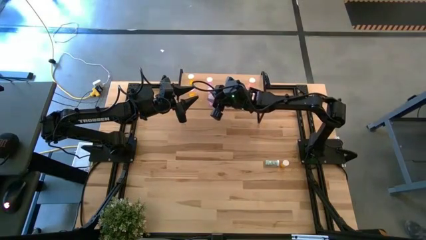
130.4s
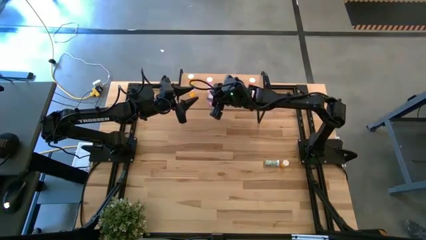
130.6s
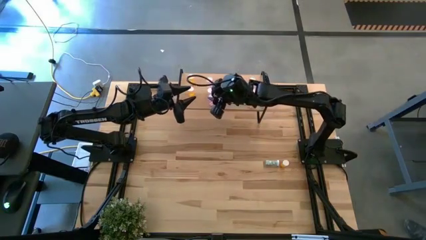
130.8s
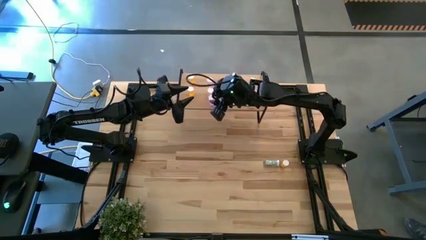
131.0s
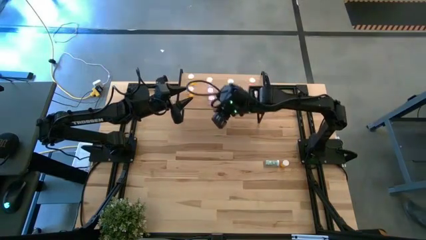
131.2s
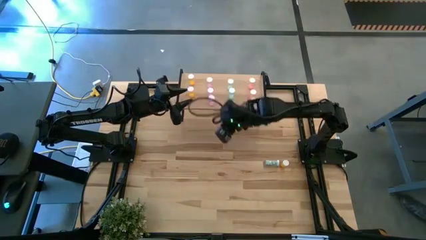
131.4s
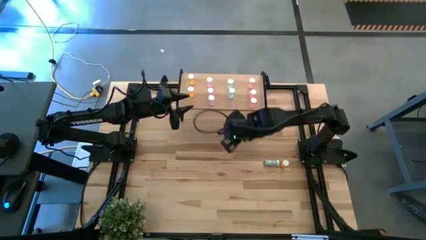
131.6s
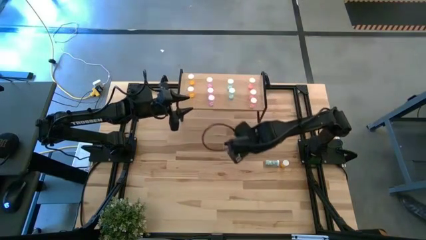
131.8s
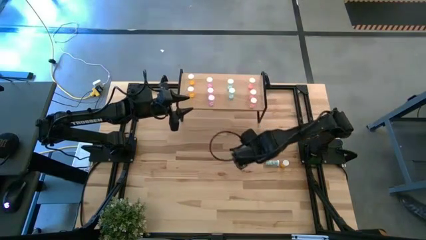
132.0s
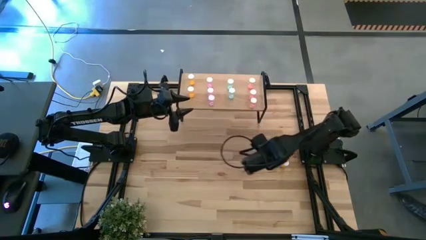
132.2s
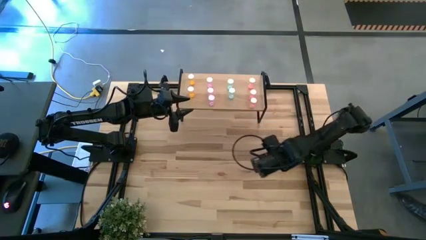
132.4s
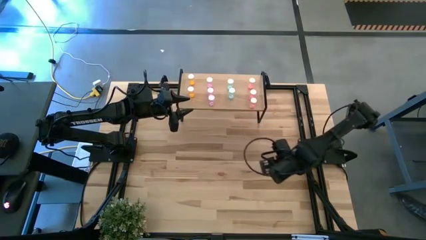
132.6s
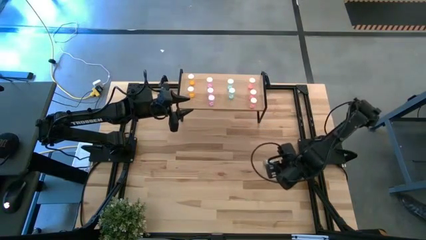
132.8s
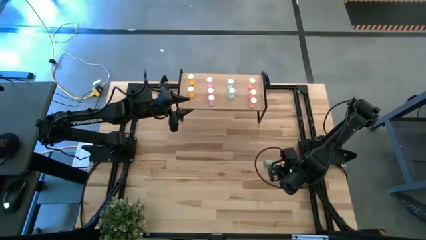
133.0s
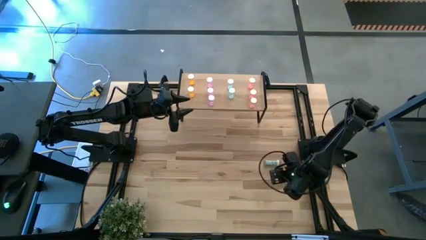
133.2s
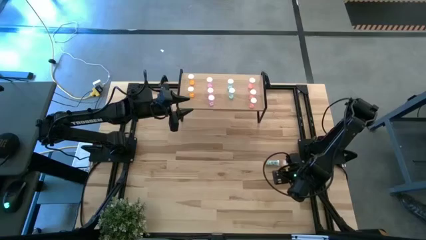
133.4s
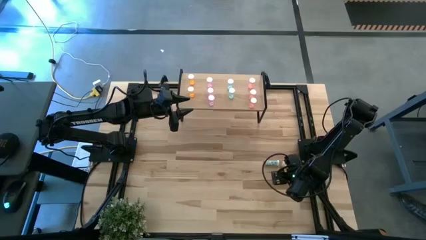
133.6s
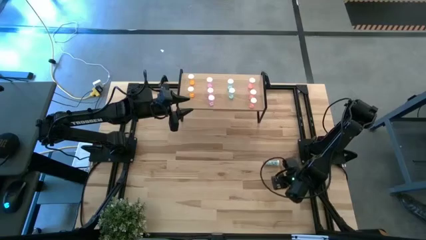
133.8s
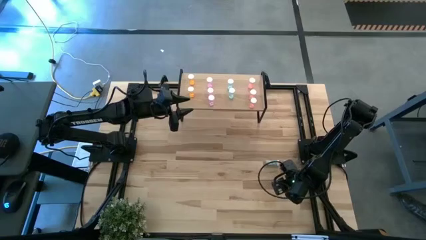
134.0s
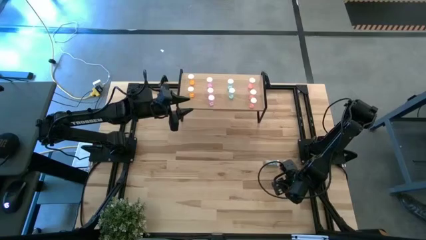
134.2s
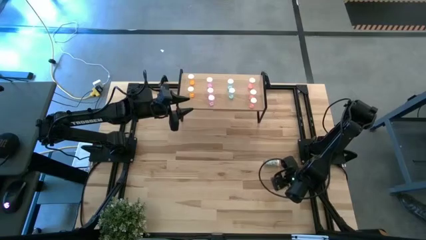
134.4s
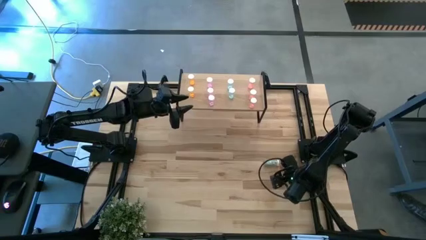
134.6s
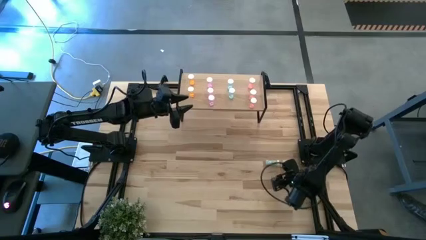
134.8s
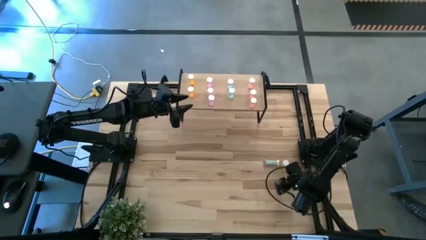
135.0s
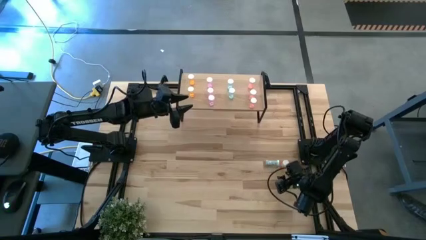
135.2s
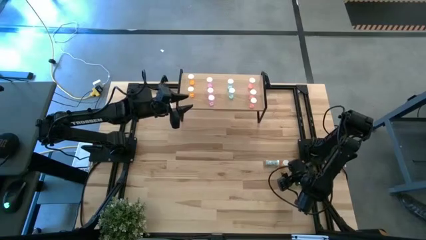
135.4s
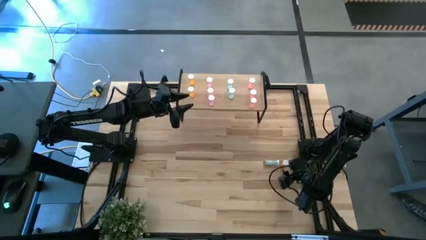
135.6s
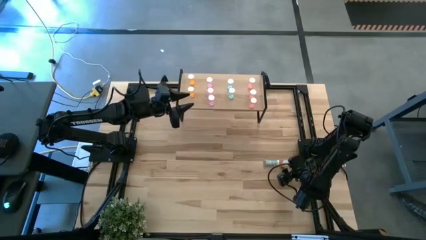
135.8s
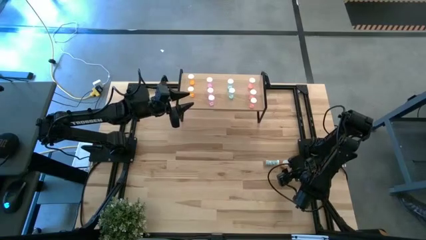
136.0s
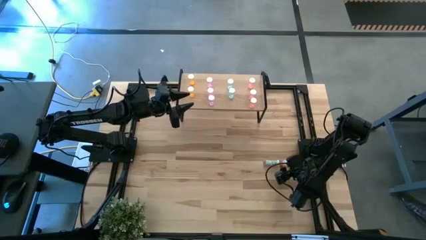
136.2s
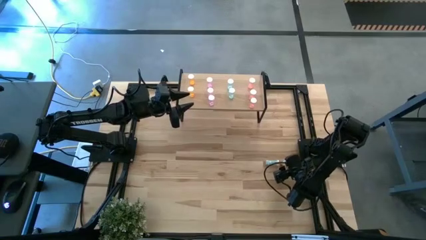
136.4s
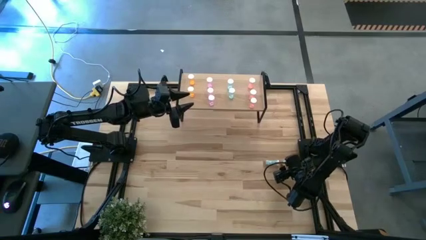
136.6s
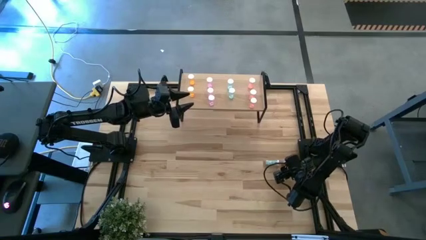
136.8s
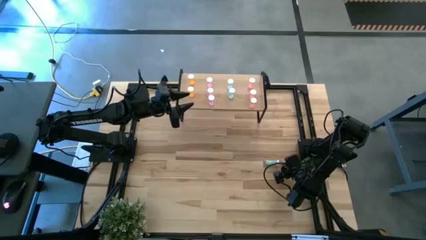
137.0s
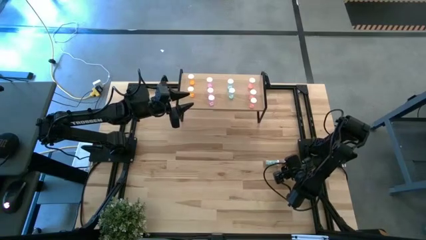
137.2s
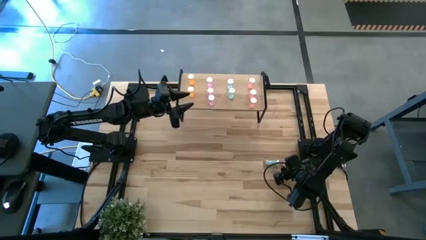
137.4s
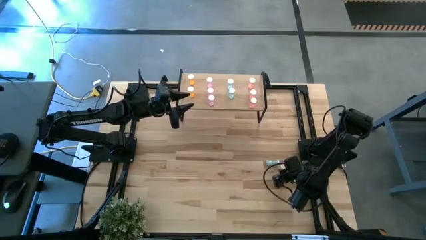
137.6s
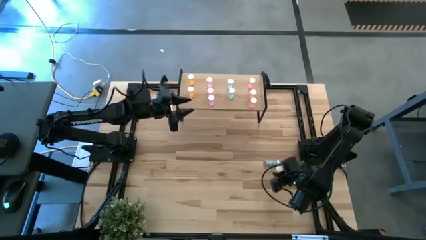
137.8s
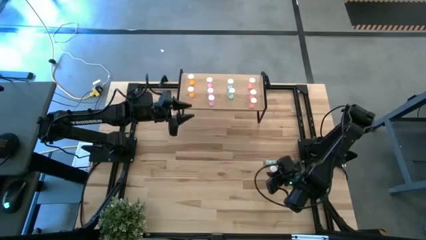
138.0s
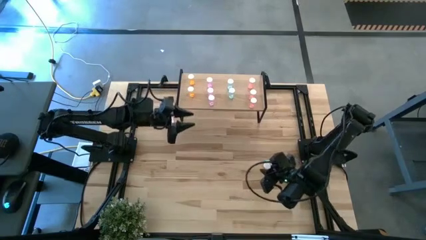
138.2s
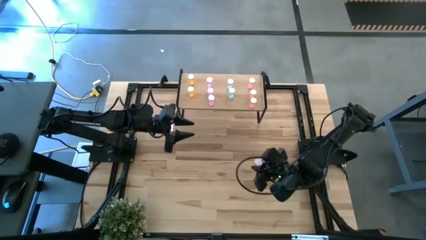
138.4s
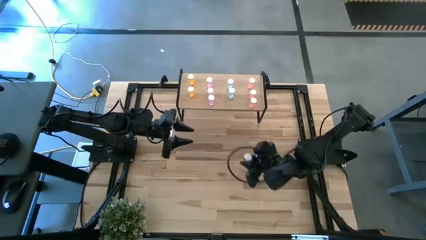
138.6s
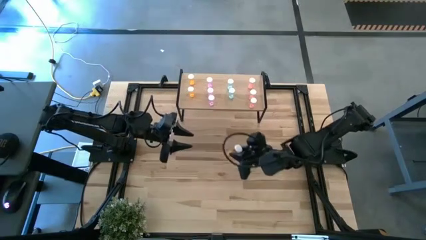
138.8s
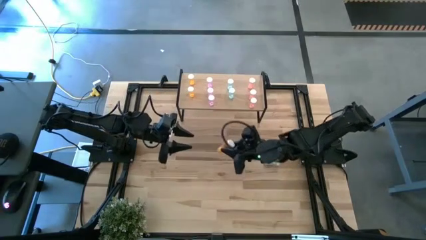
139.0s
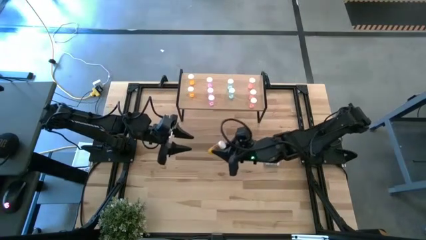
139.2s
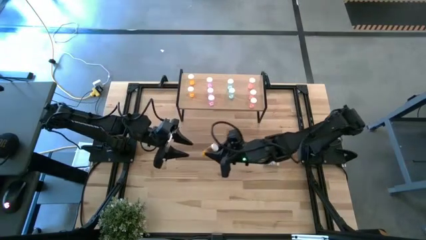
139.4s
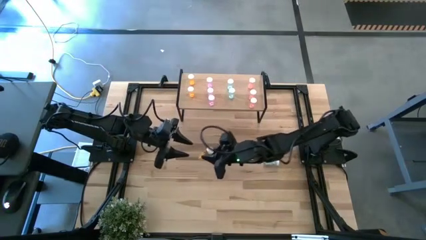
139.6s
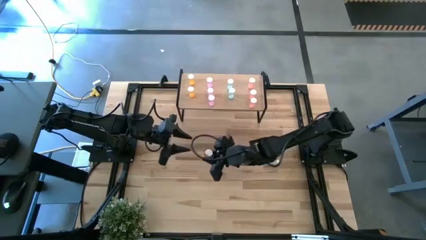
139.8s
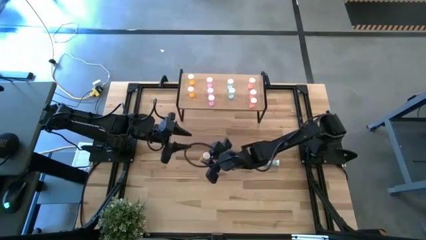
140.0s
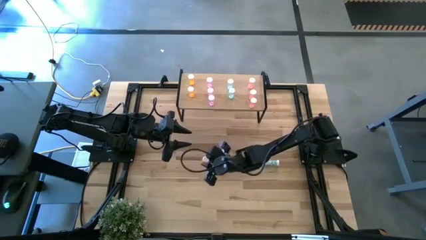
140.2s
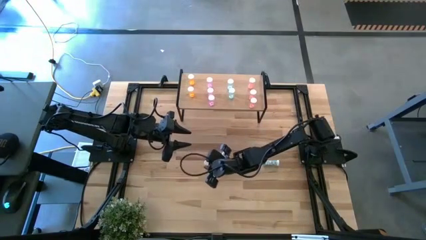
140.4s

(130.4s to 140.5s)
Task: Pick and place medicine bottles onto shelf by color
Put the orange medicine bottle on the shelf aligned with the other orange medicine bottles

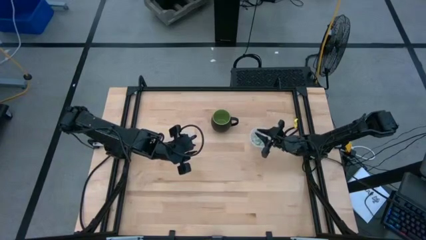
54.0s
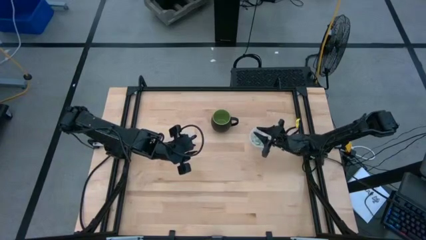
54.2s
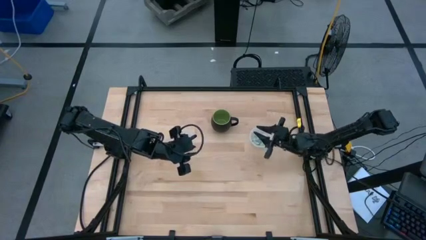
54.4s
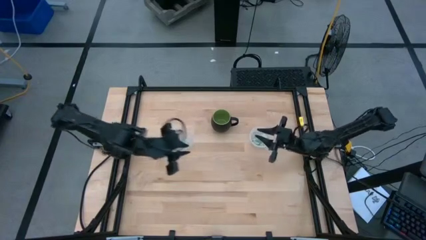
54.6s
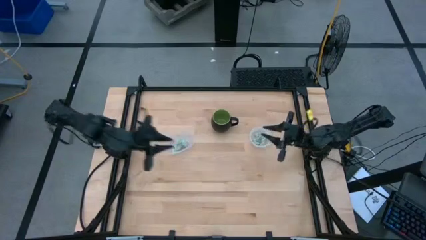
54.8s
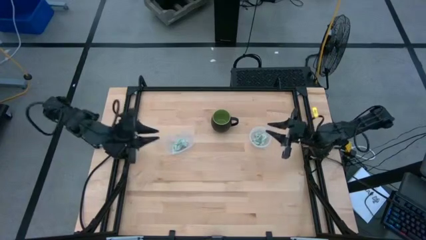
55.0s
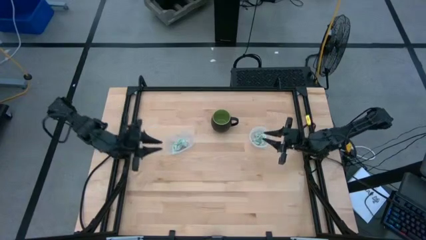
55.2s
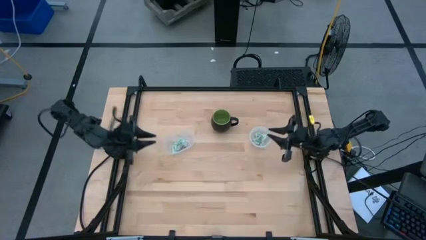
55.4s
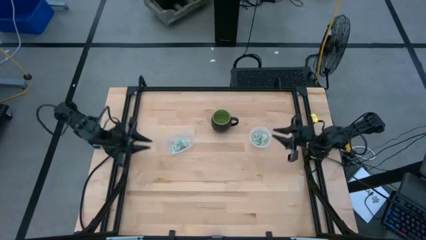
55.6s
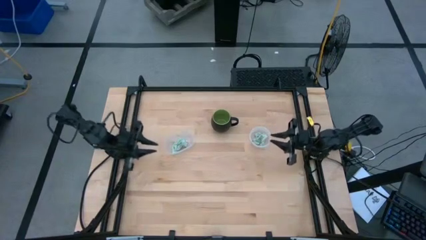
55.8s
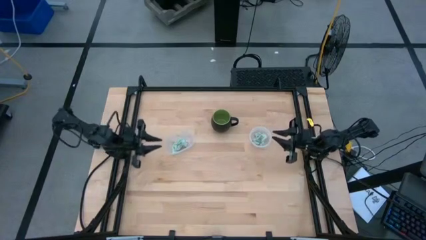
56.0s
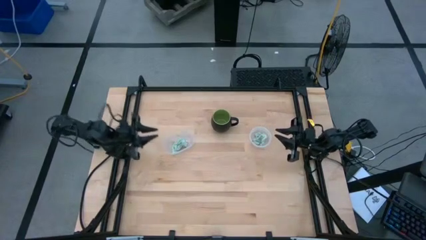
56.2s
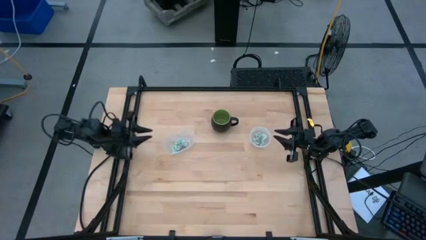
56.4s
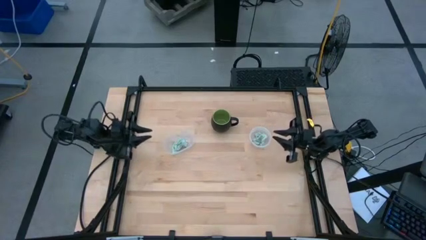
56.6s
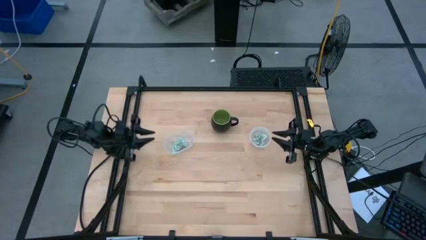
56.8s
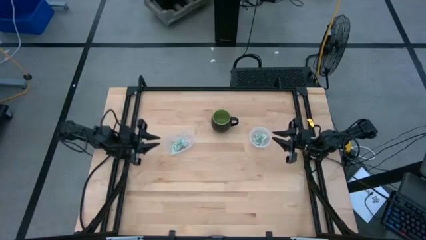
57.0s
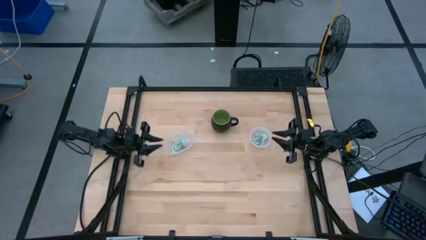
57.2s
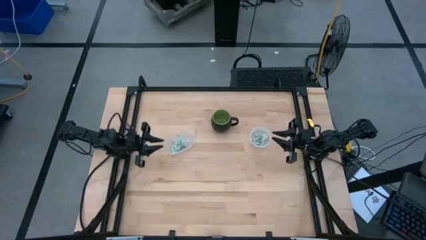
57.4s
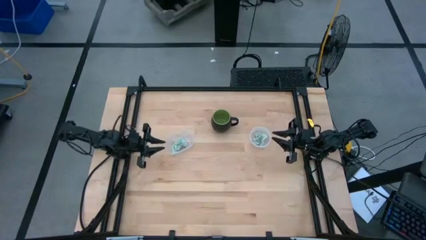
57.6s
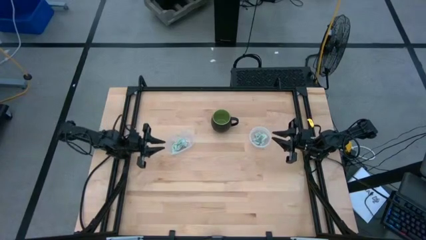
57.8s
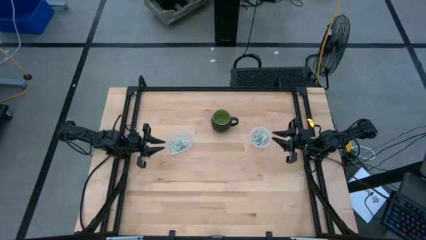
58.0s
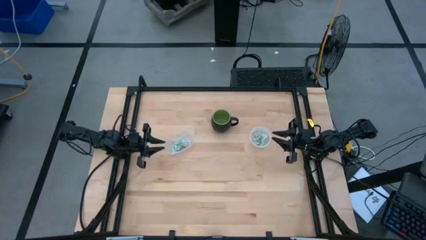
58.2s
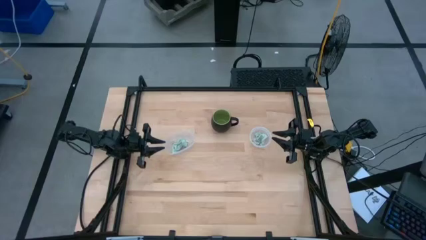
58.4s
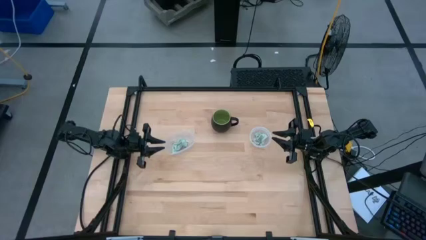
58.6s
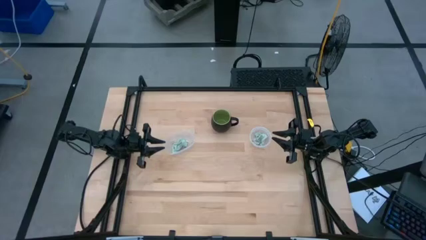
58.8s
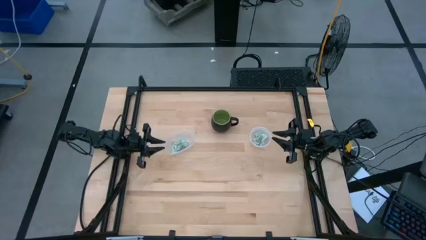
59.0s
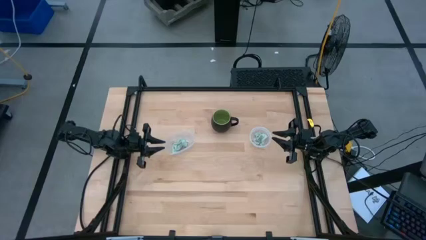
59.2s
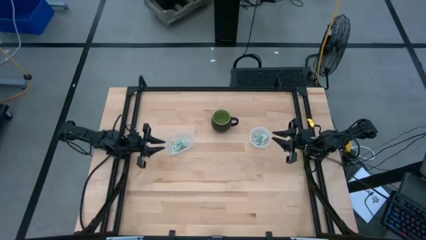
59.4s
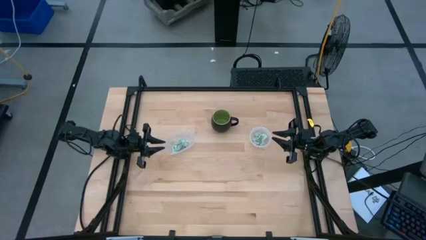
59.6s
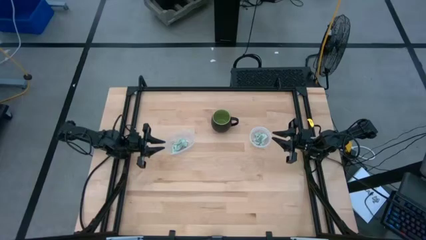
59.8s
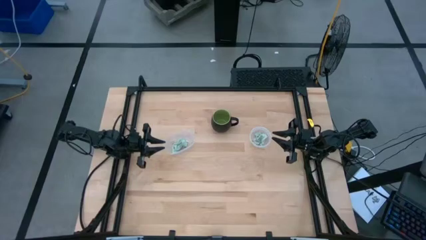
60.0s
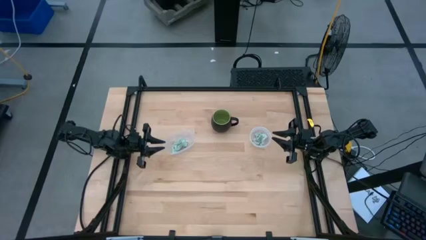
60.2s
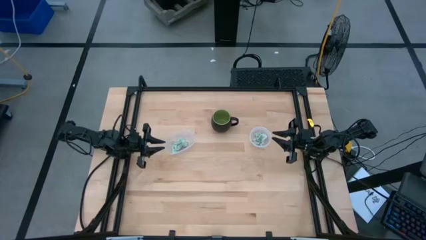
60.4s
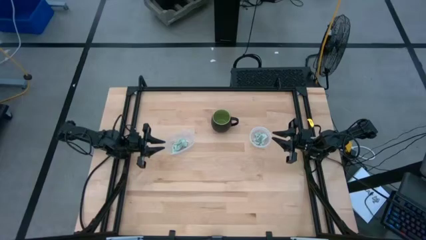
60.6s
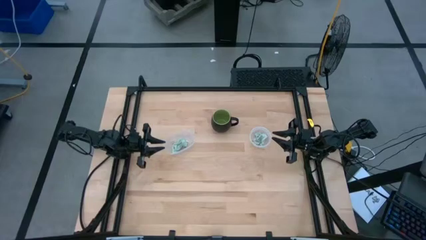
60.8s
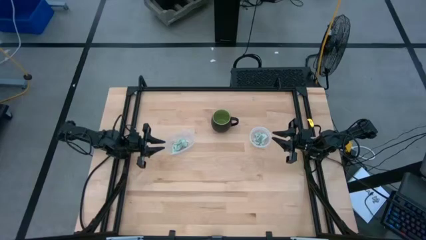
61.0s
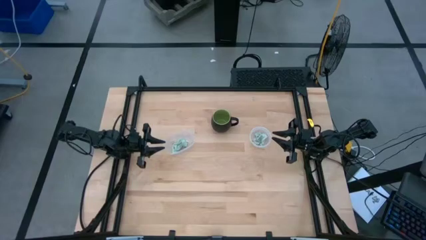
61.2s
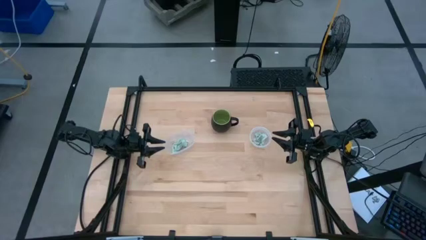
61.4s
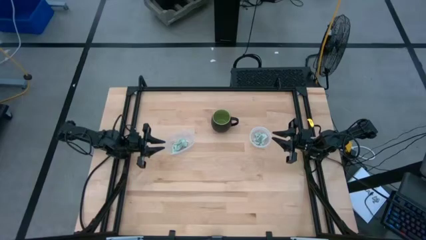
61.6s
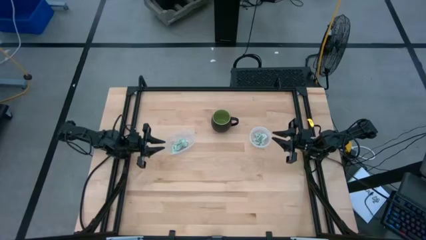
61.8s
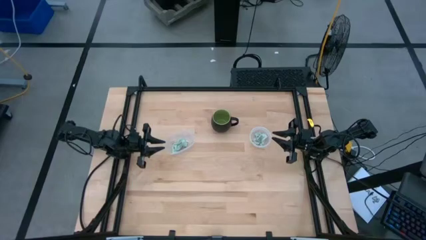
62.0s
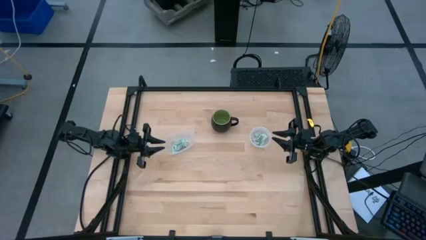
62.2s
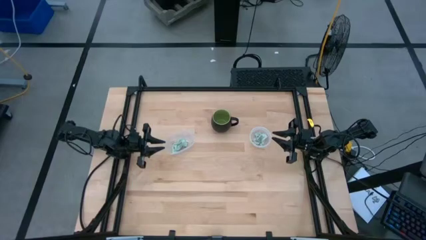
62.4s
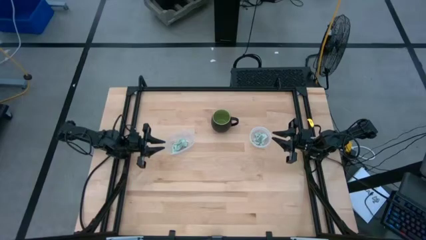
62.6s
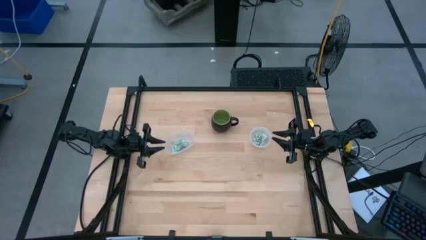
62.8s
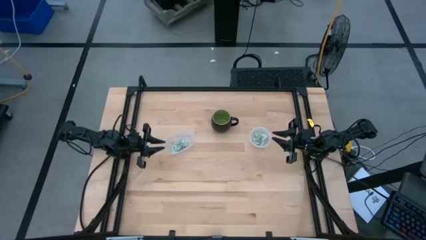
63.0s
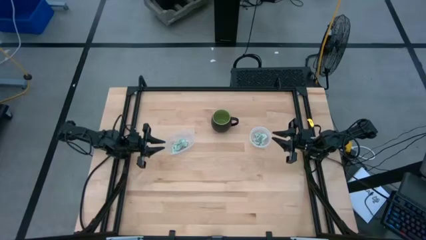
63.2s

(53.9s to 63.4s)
Task: Pick and place Stevia / Truvia into bins
Return to Home Position
